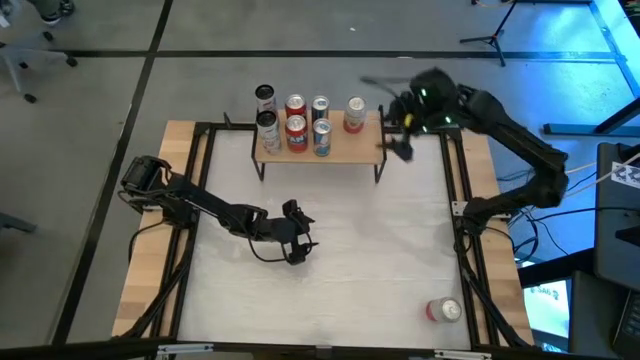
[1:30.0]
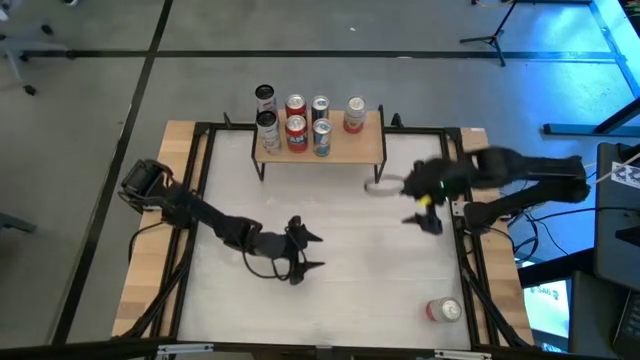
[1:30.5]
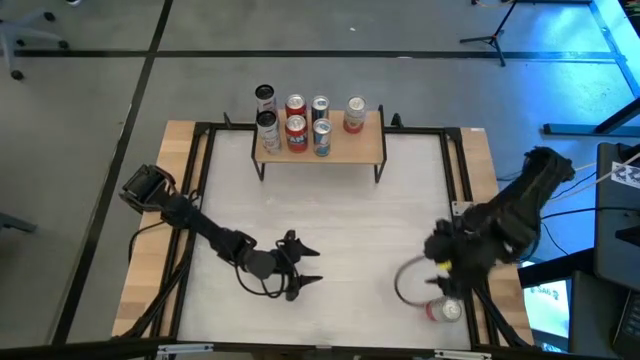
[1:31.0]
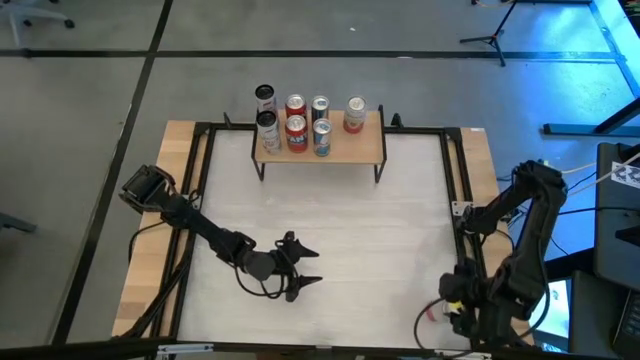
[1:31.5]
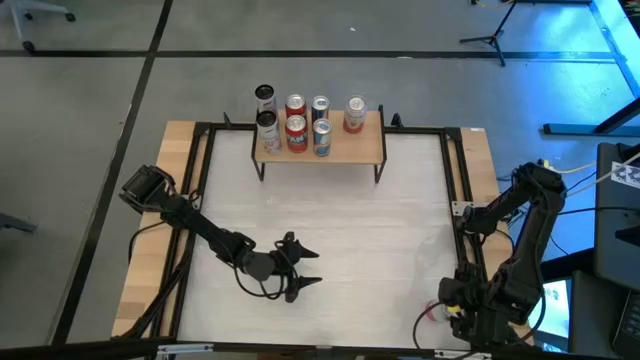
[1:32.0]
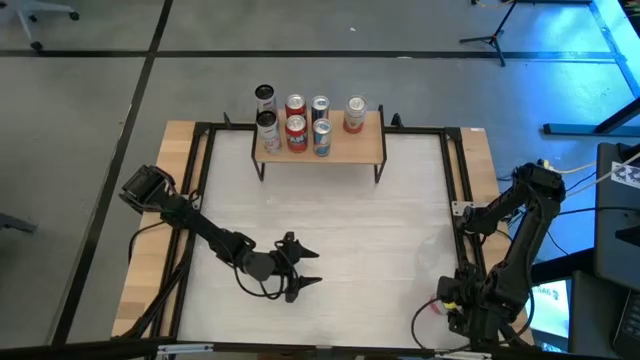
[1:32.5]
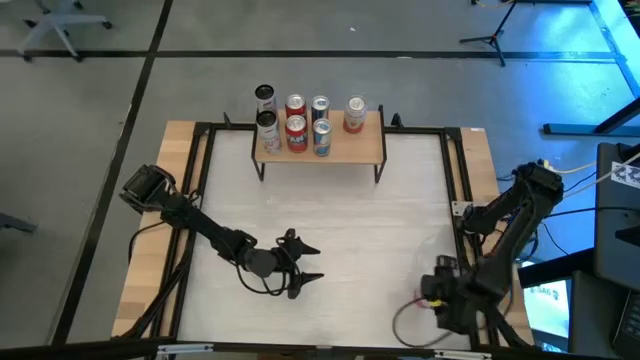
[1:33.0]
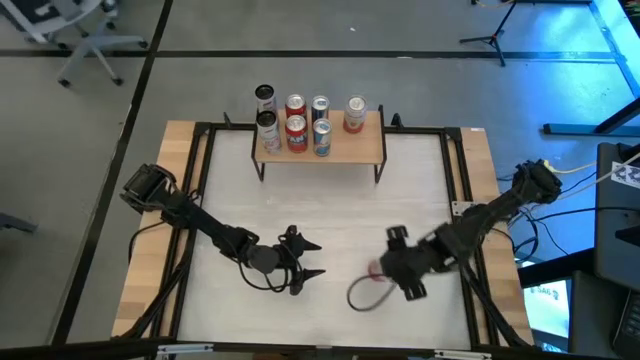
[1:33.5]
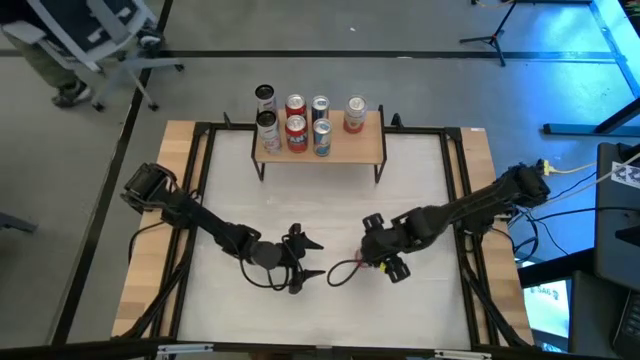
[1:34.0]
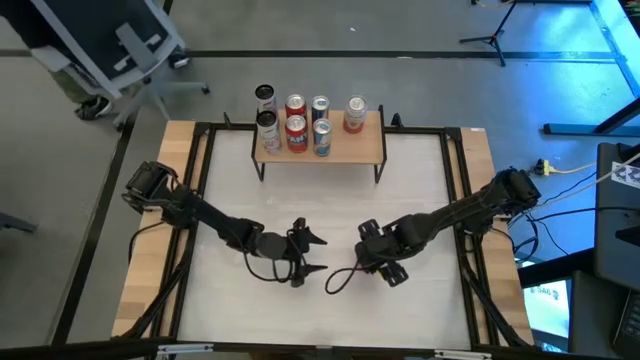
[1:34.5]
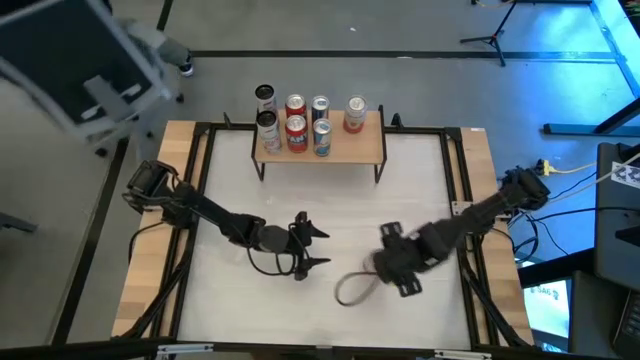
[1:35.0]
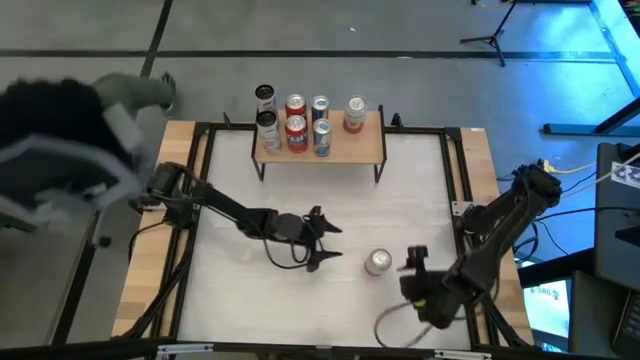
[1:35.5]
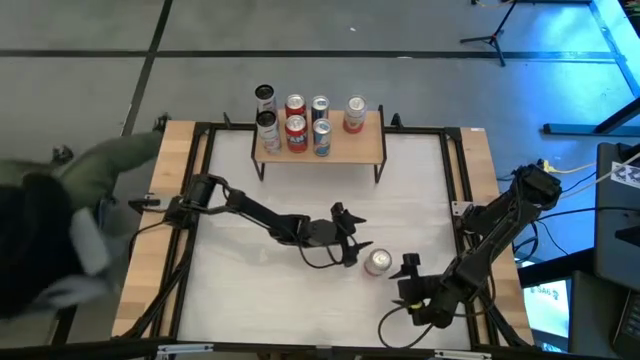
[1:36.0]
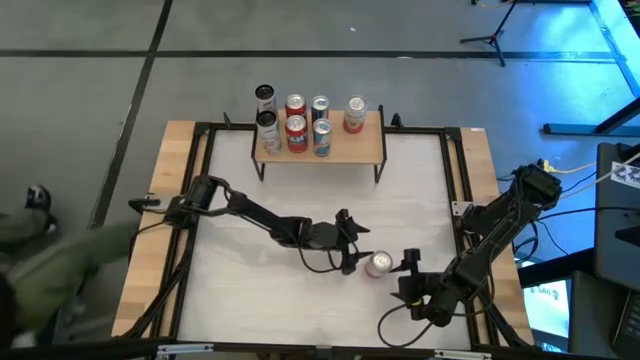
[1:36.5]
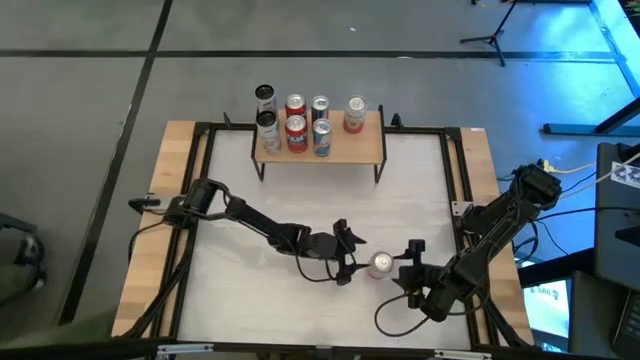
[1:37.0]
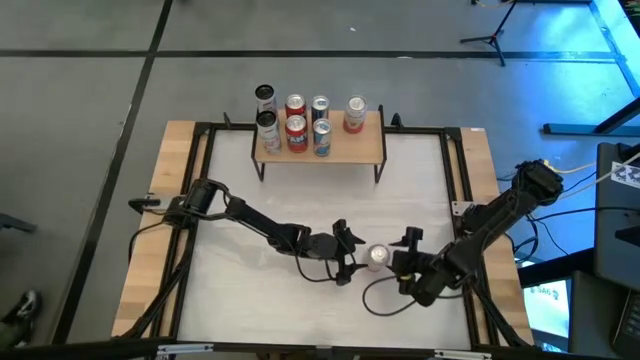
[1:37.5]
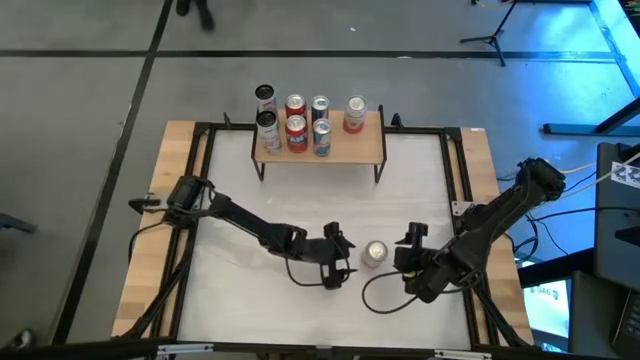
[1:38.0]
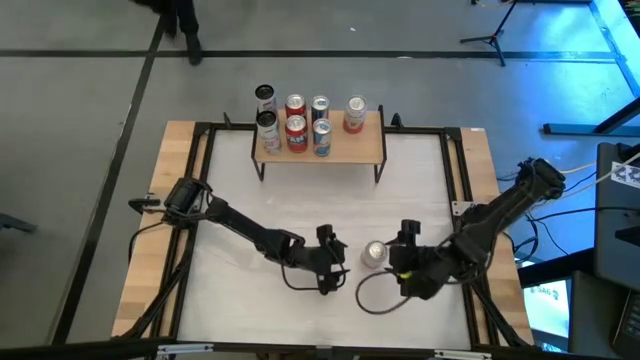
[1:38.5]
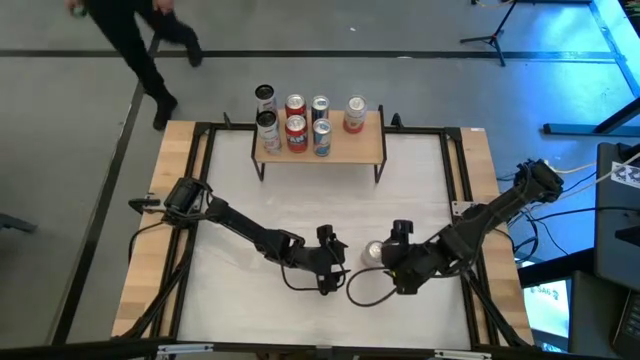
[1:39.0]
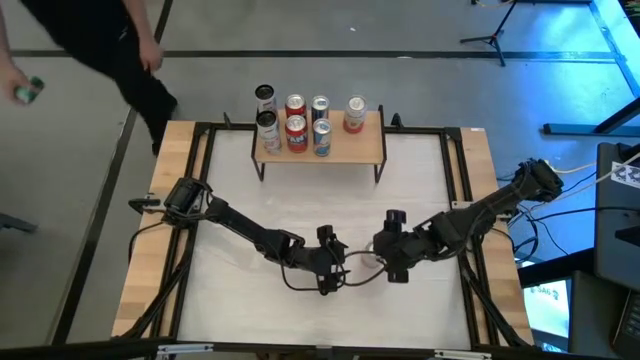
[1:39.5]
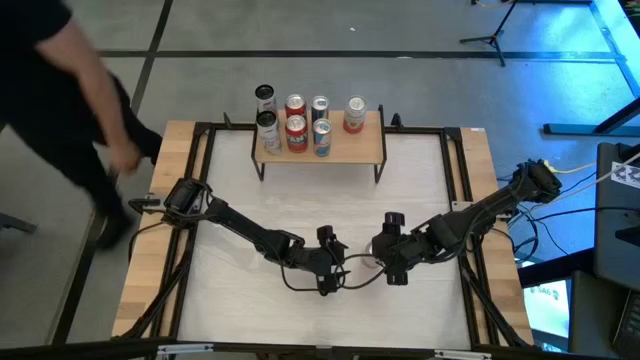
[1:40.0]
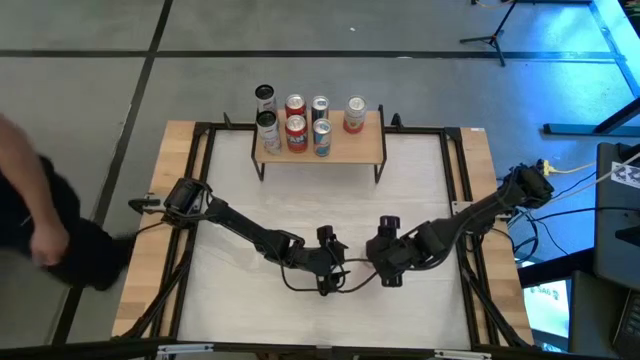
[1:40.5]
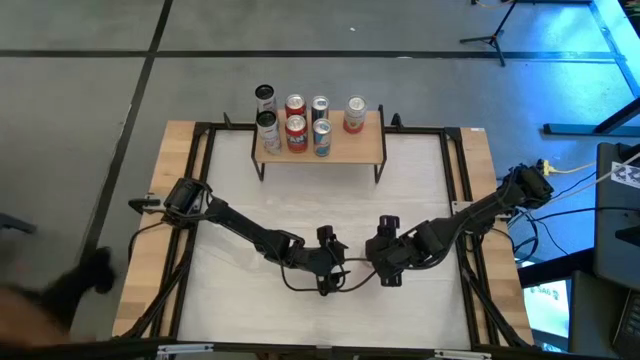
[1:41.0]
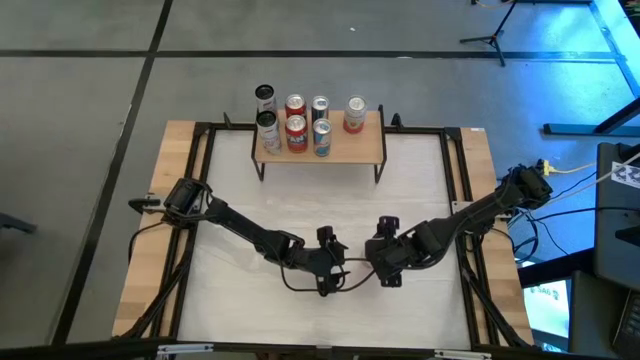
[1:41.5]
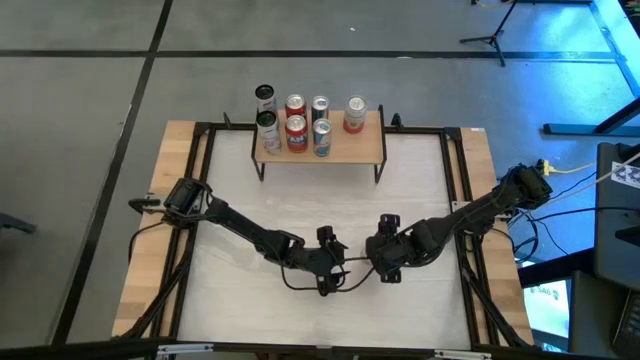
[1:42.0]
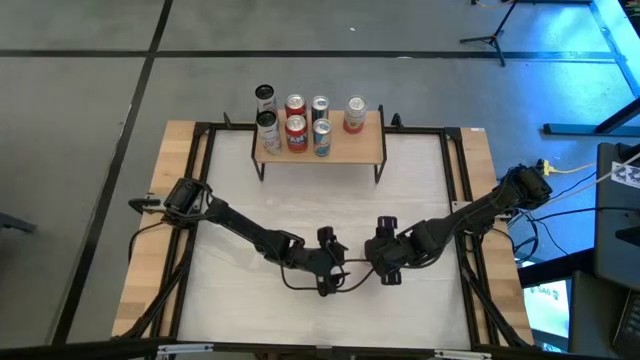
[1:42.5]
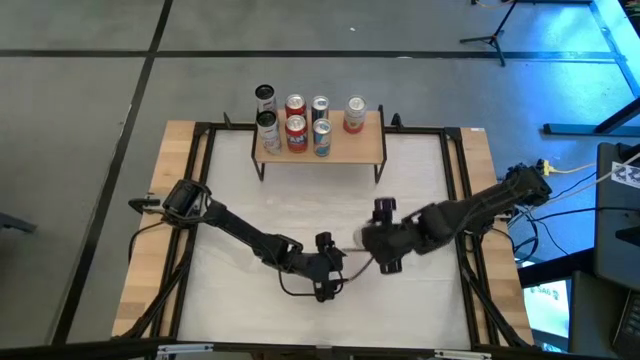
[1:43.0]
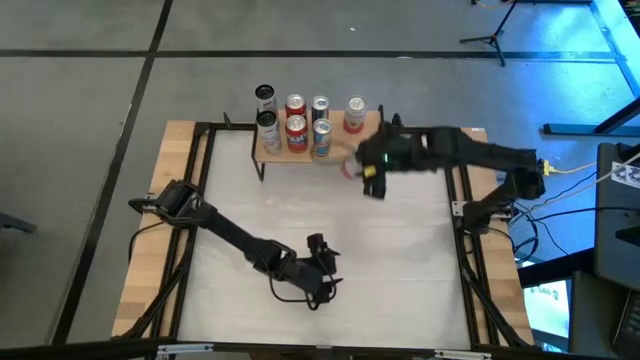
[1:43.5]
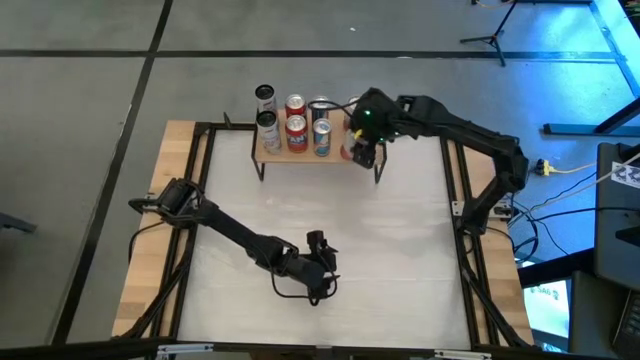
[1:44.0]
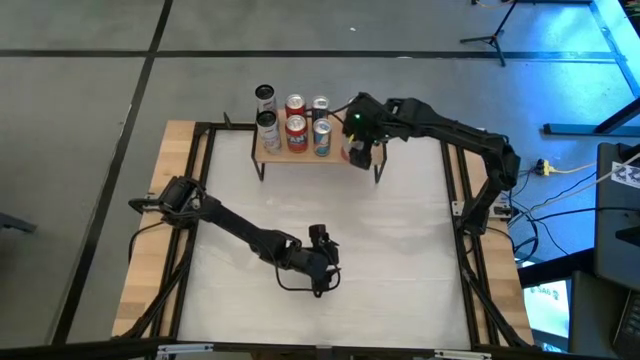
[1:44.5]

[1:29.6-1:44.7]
Task: Place canned beverage on shelf
Put the pink soda can on the shelf

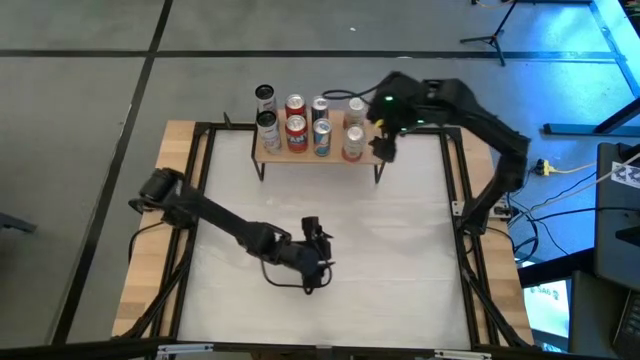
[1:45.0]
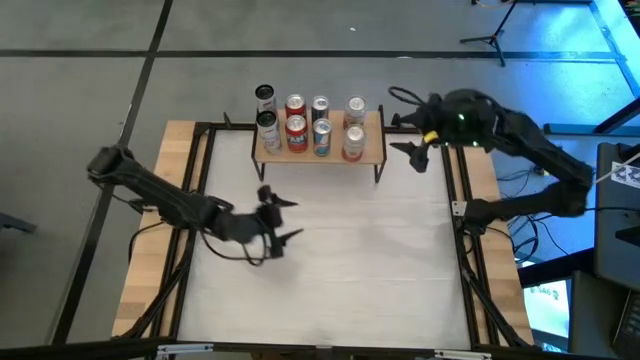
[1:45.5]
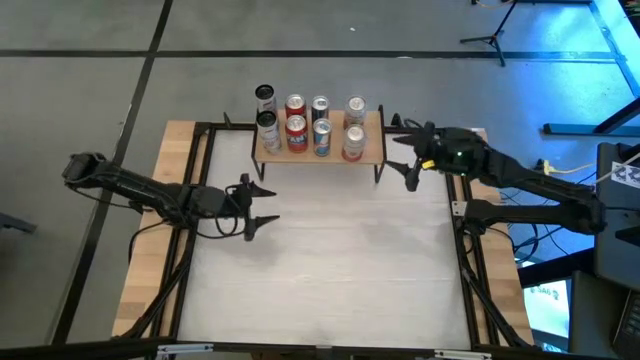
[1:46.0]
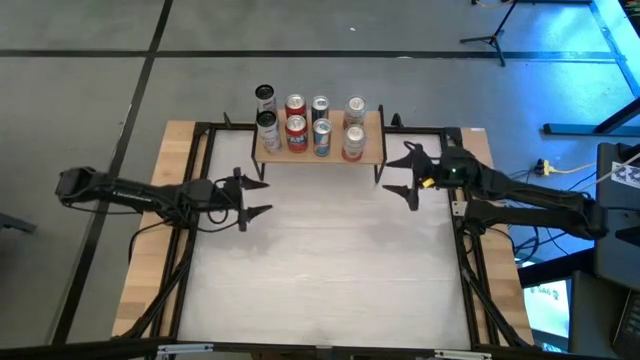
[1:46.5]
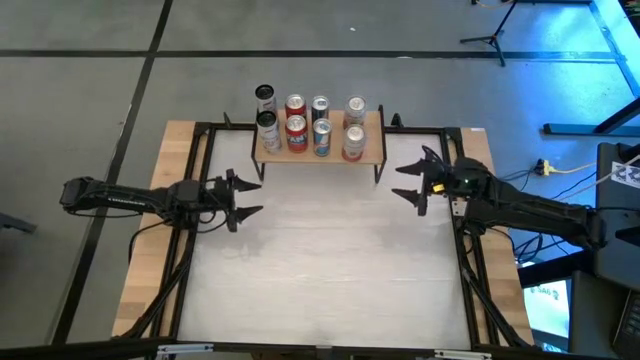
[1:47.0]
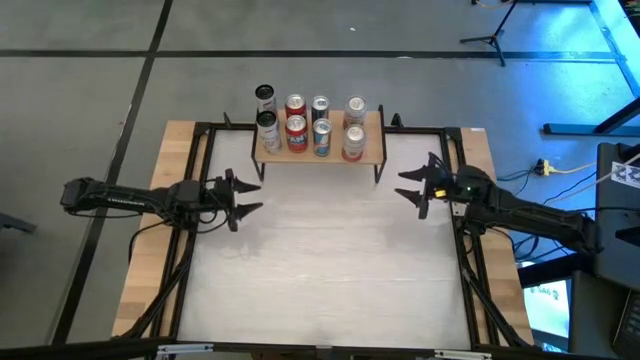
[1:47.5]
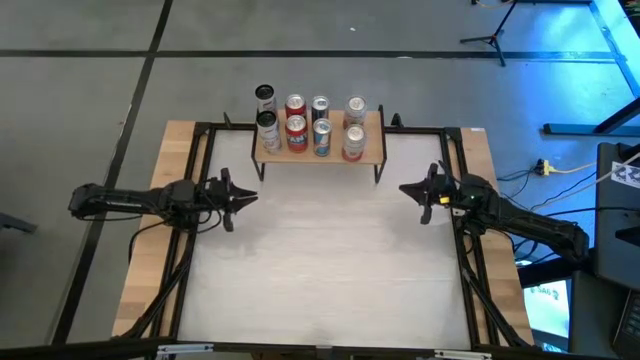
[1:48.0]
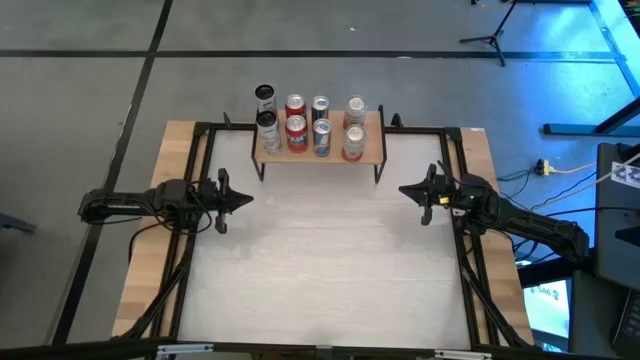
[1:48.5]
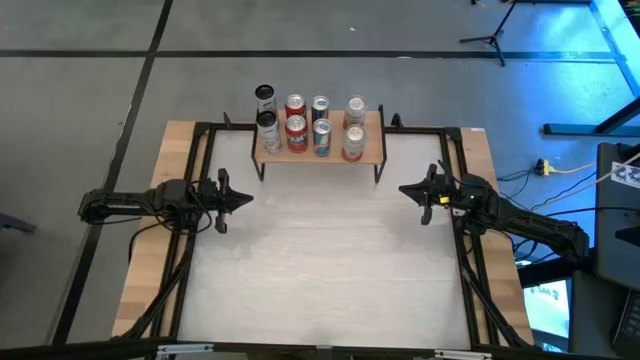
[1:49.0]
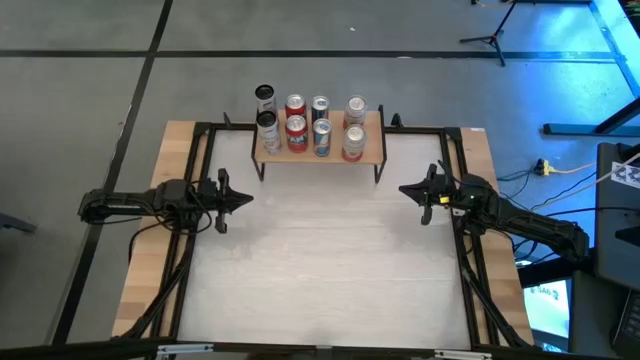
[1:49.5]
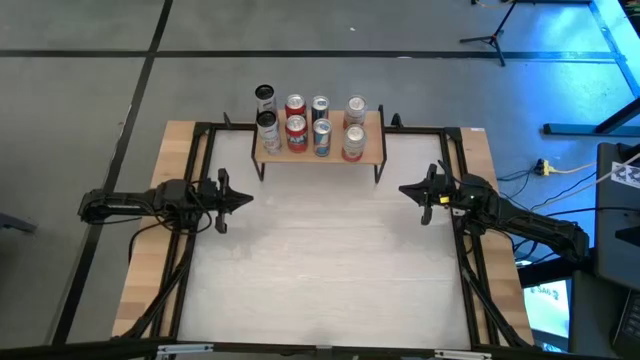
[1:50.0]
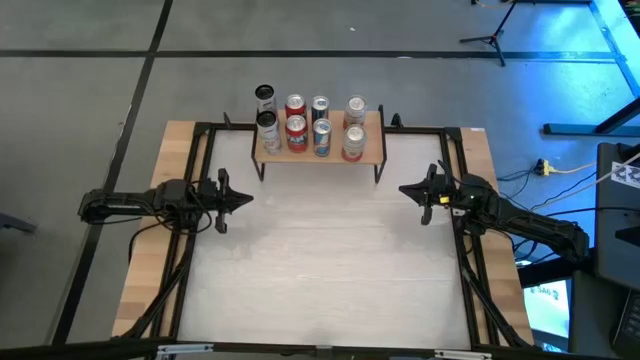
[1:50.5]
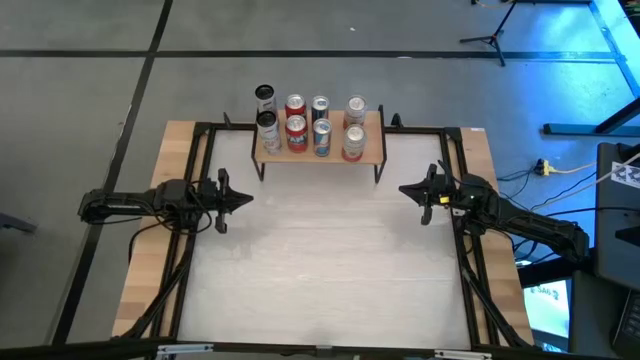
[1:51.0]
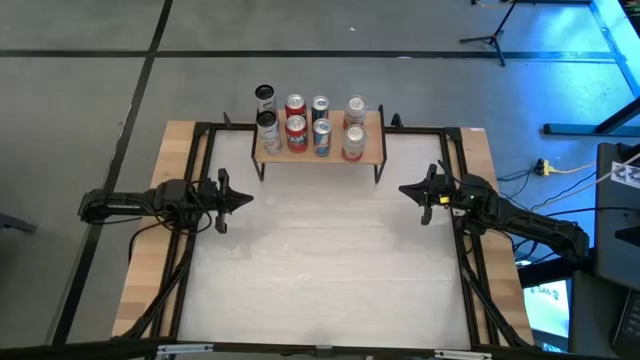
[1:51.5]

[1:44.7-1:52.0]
Return to Home Position

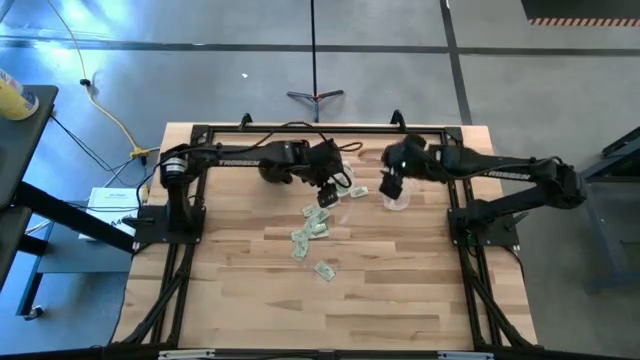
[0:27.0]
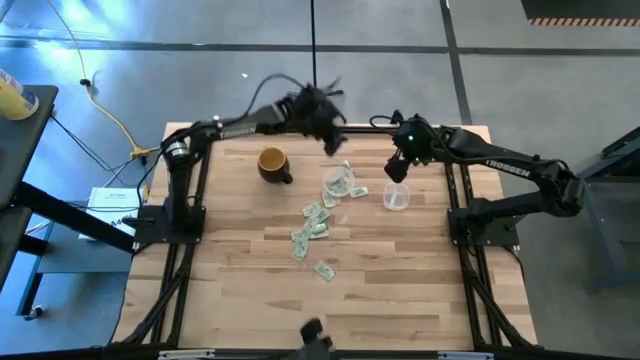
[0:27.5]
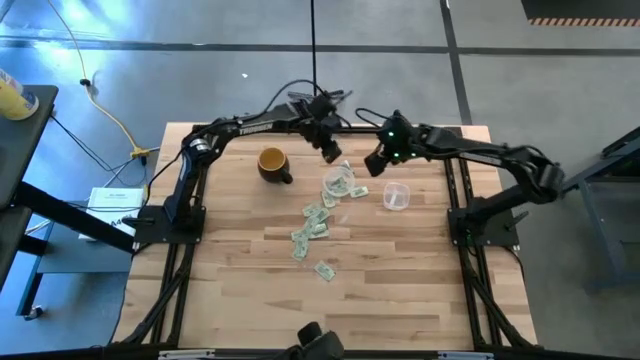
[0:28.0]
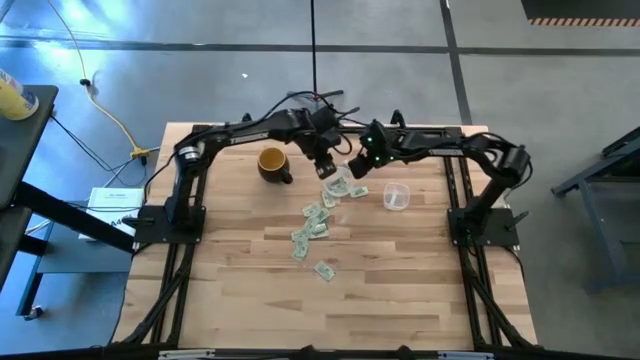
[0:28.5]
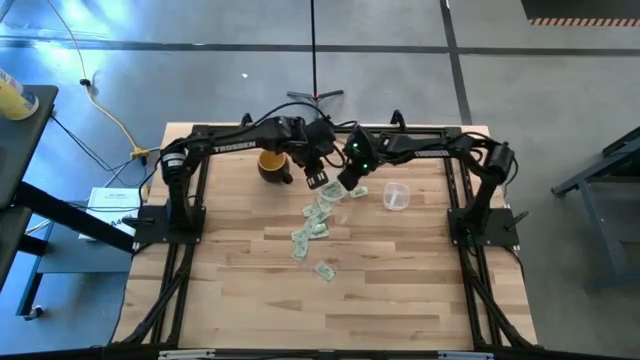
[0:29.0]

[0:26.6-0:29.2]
Task: Pick and place items into bin
Put the light green stevia packet into the left transparent bin
